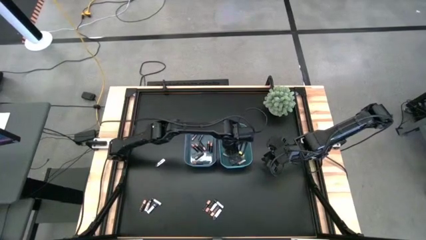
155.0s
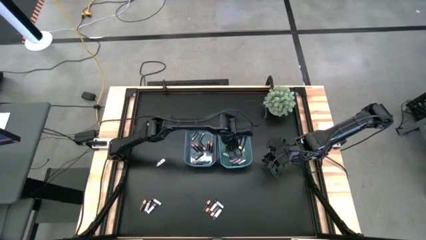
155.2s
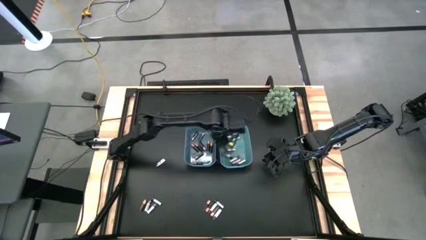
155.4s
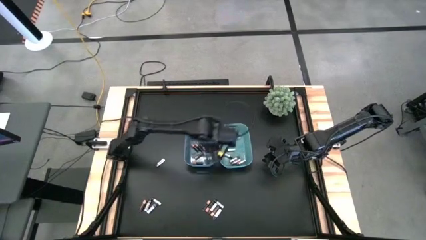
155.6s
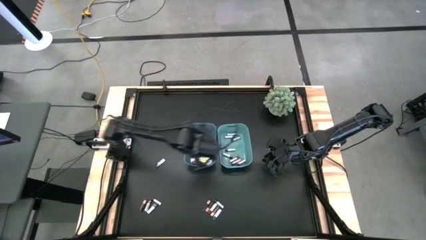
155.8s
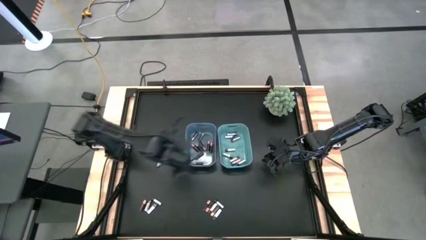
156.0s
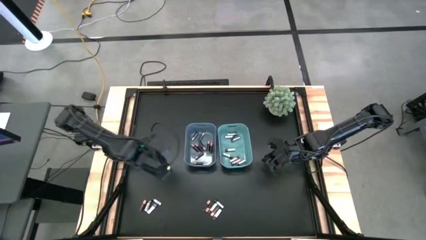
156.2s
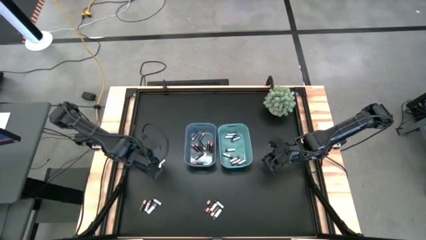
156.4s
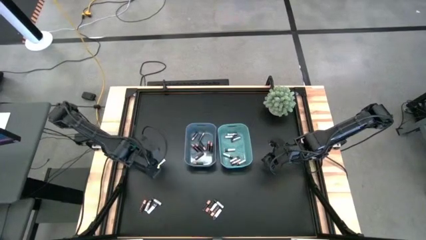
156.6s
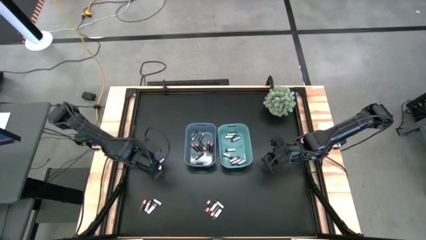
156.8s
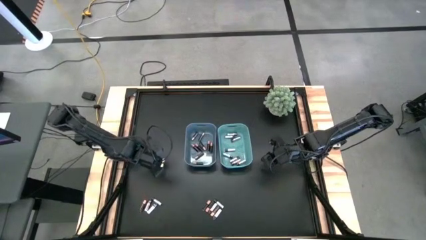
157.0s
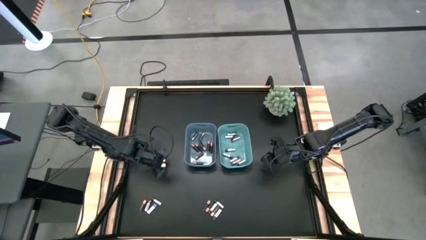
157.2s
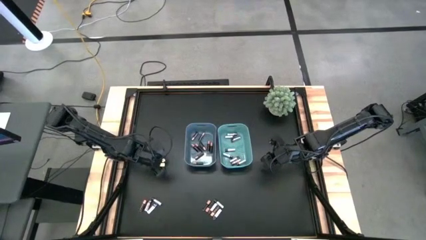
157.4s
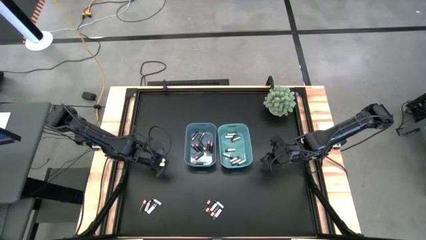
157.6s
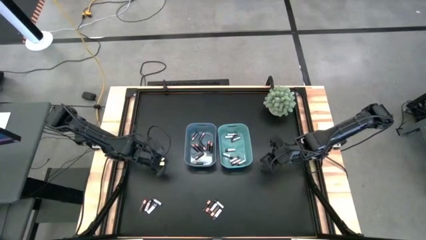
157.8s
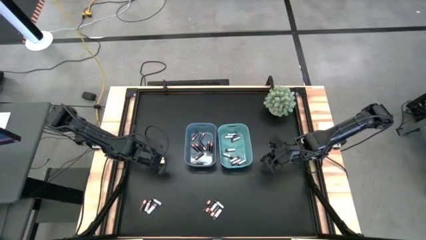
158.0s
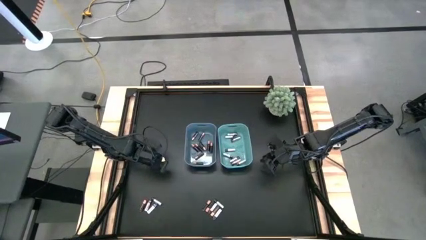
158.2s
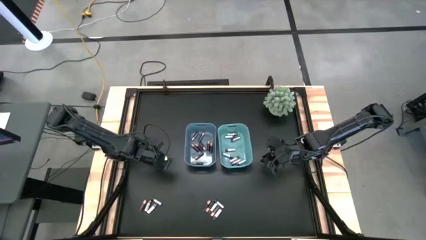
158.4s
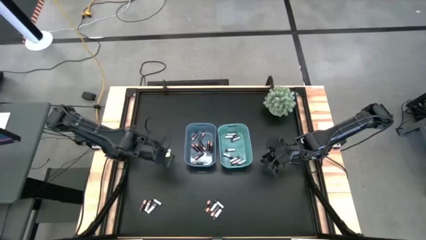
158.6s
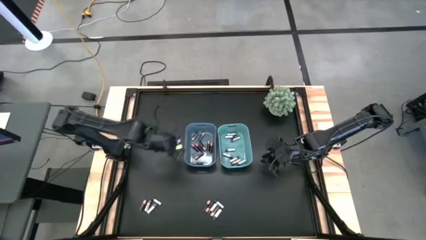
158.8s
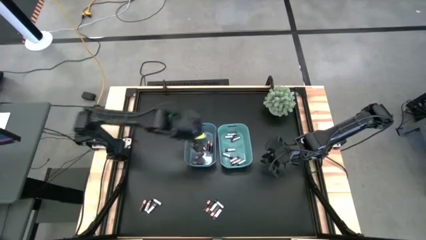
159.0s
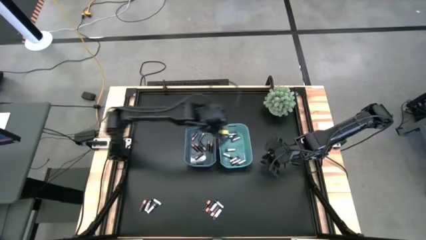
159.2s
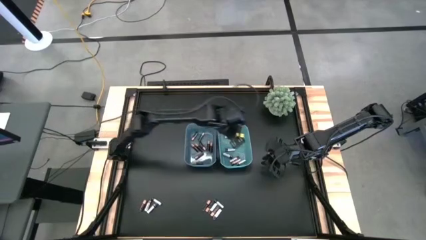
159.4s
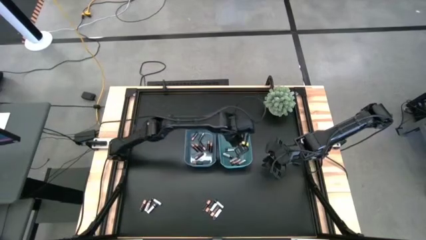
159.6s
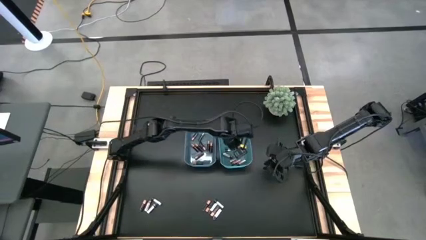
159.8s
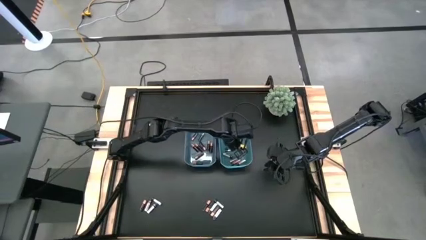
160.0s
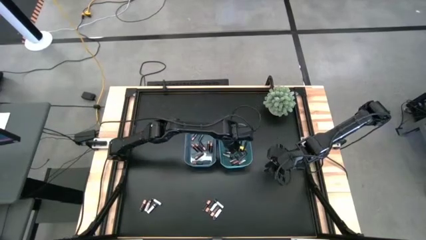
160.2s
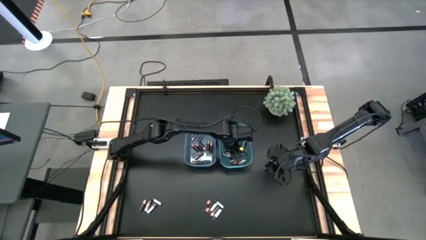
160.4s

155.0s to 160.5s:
Task: Sort batteries
Put the white battery into the green bin

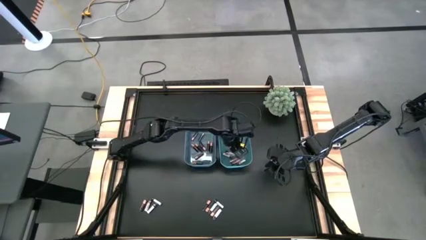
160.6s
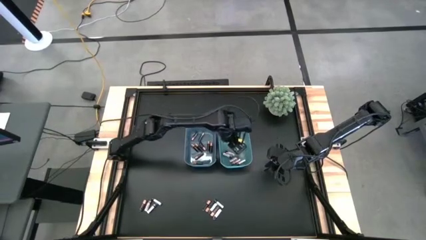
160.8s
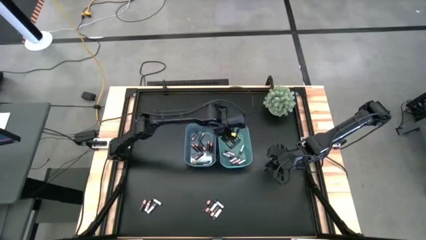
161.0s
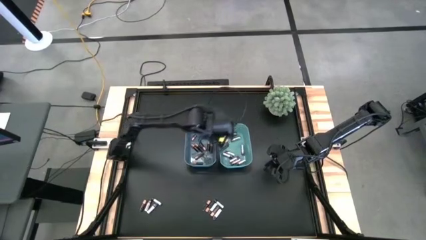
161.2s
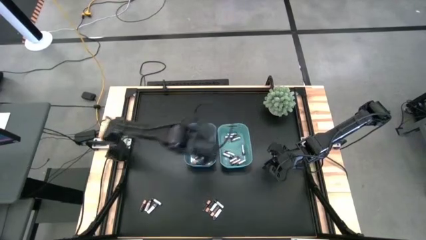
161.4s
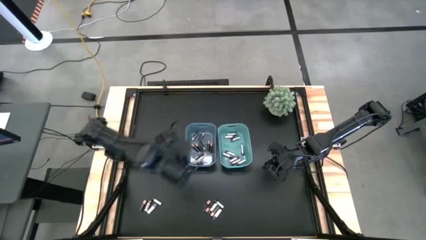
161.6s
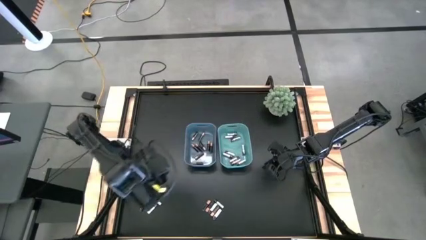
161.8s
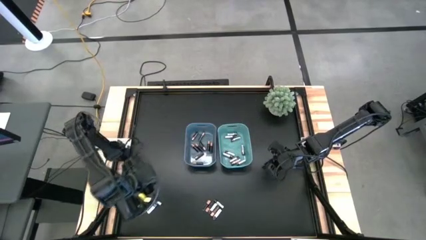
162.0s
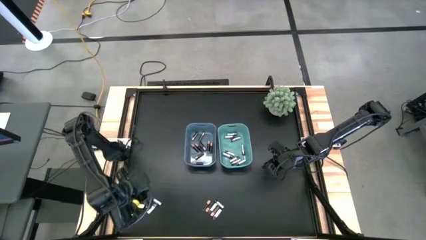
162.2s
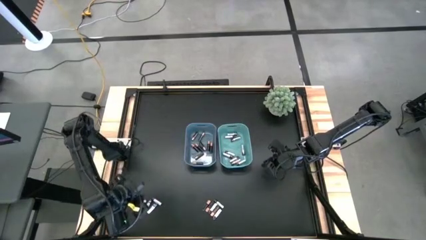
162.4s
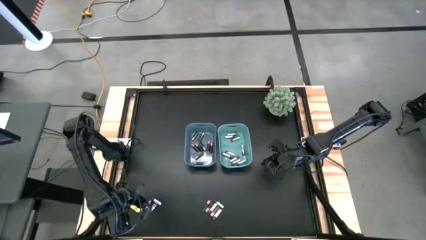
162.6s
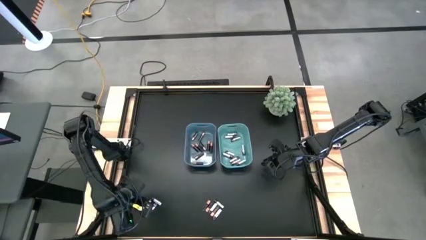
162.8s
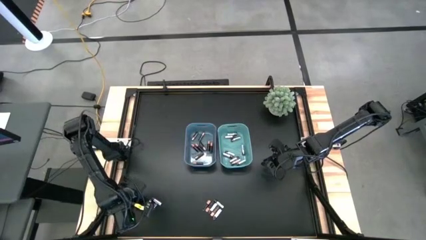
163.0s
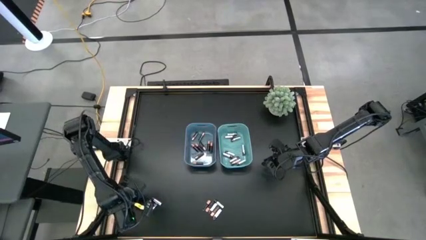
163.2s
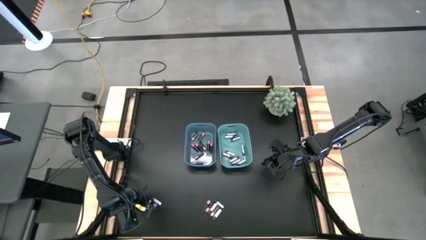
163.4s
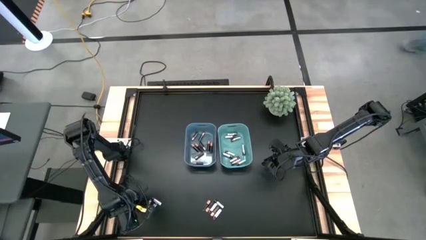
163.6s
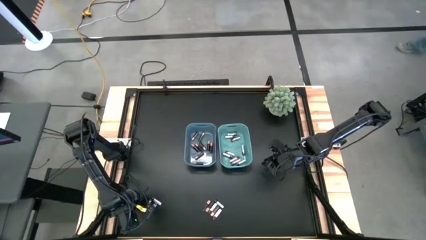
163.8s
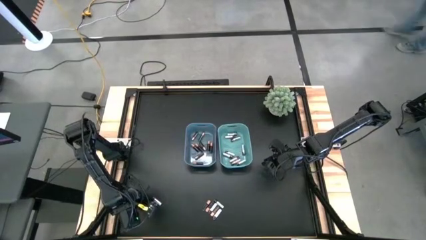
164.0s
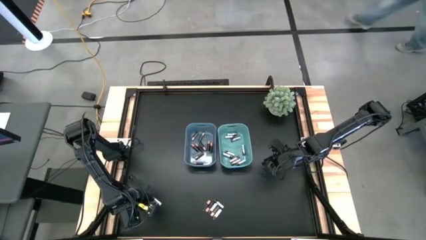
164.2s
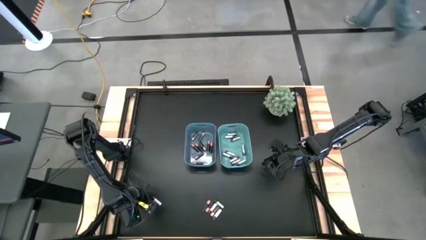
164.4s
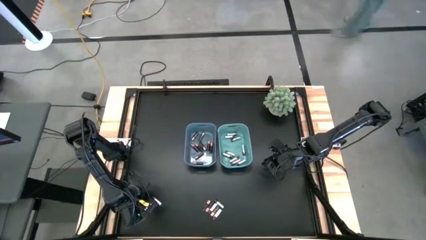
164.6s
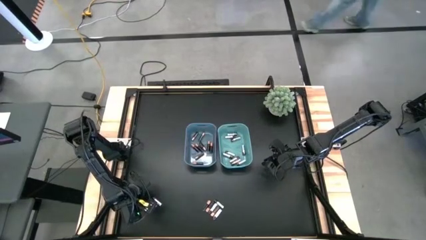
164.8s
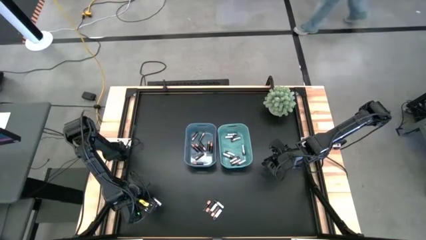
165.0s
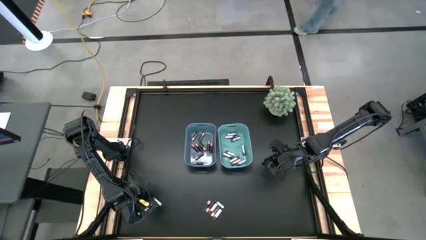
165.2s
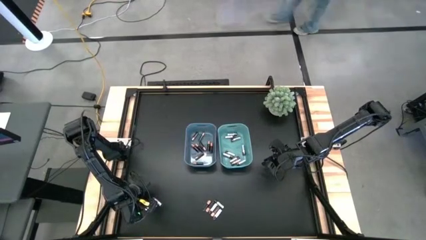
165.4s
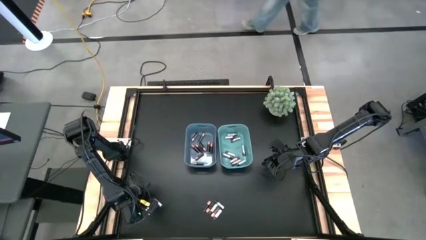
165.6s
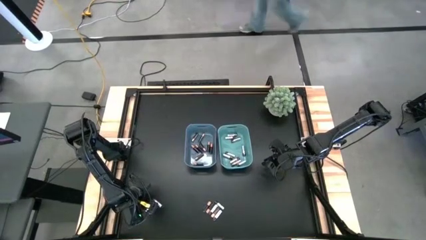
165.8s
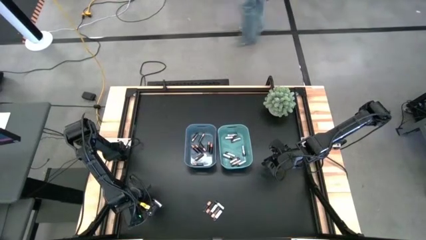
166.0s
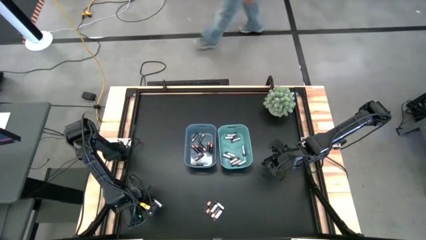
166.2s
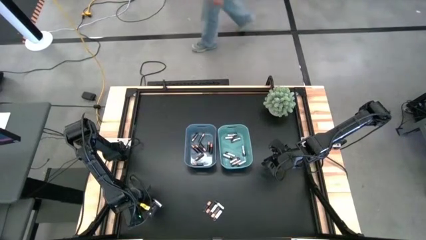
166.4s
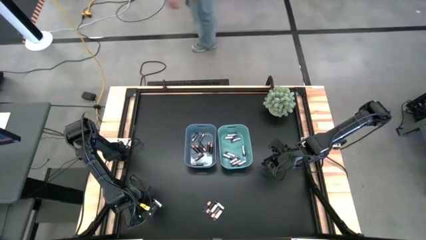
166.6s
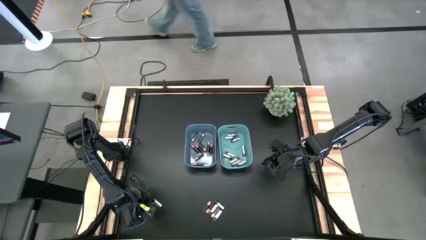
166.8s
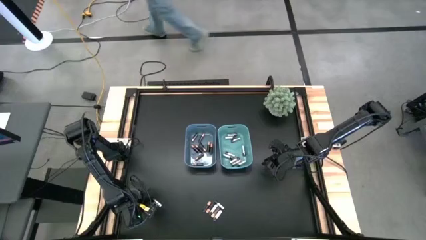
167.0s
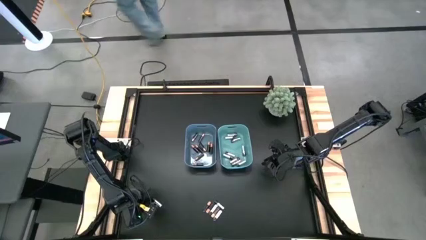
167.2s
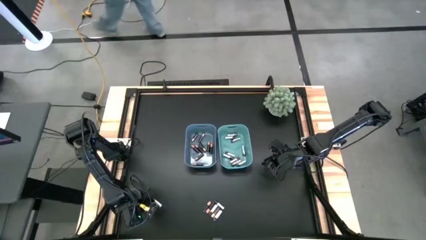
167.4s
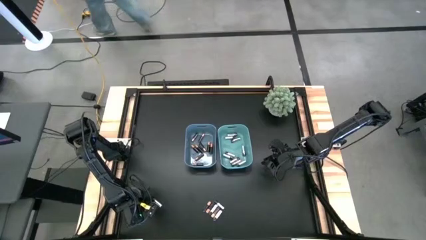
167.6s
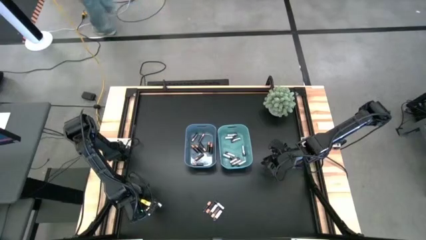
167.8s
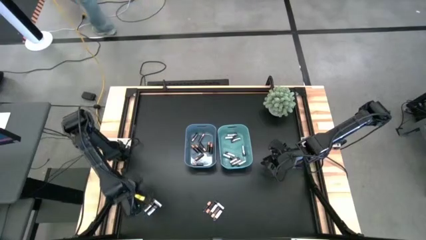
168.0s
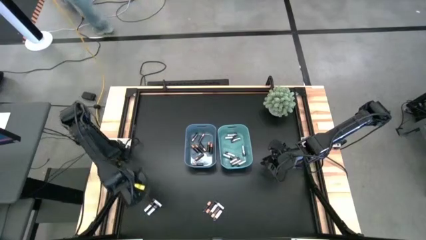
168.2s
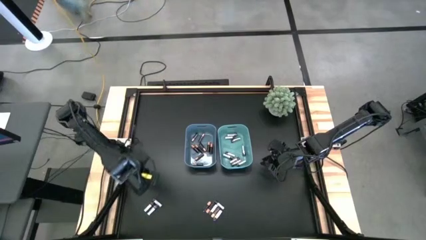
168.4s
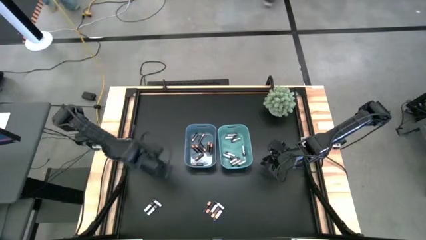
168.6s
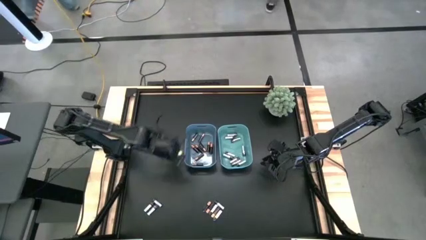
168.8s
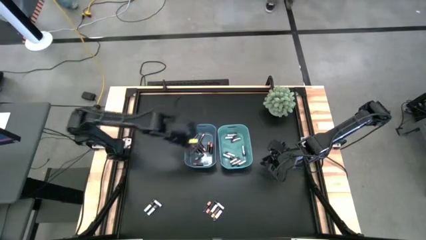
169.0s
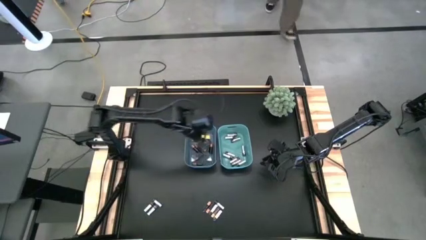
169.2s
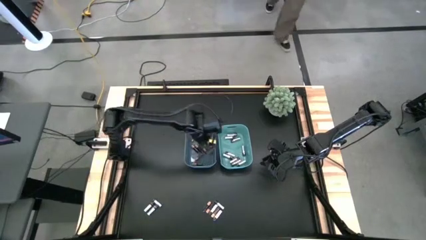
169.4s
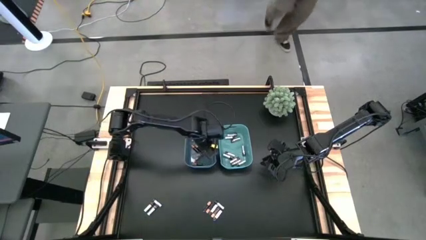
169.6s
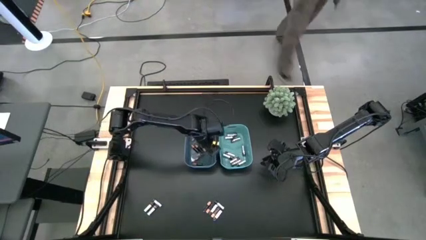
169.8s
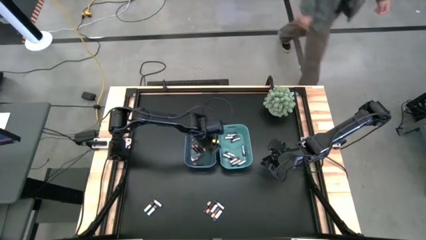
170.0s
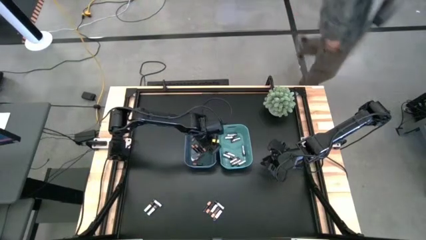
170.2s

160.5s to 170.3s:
Put the black battery into the blue bin
